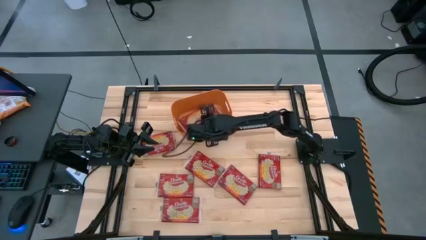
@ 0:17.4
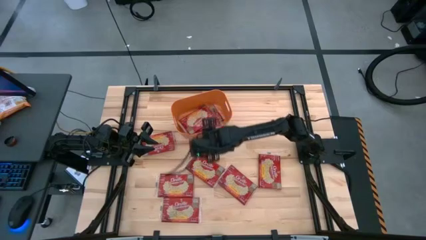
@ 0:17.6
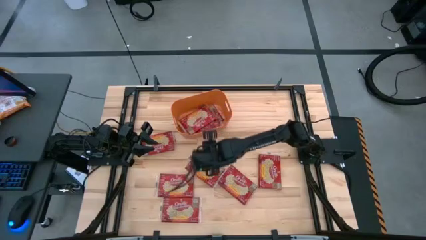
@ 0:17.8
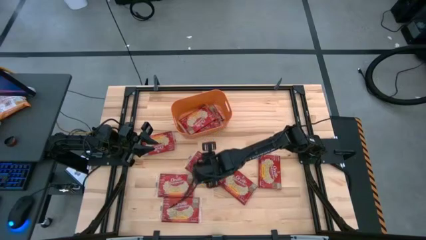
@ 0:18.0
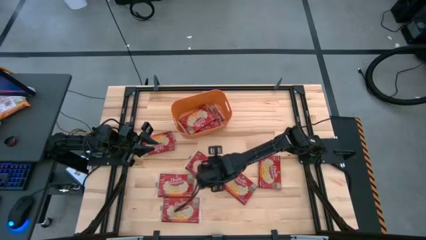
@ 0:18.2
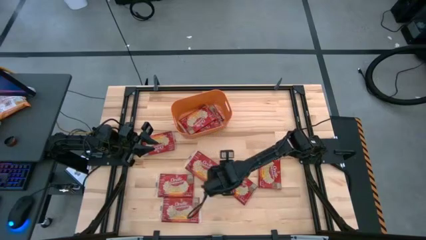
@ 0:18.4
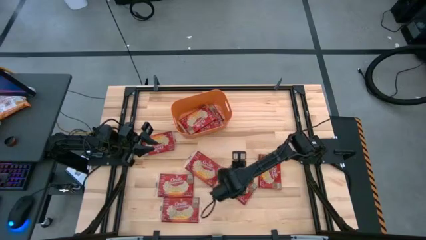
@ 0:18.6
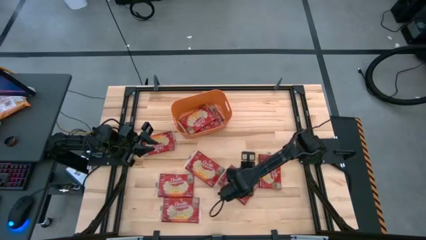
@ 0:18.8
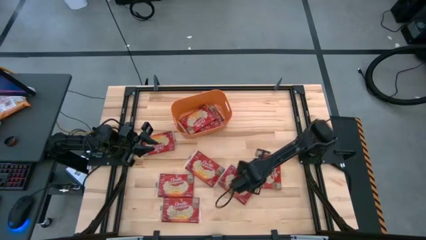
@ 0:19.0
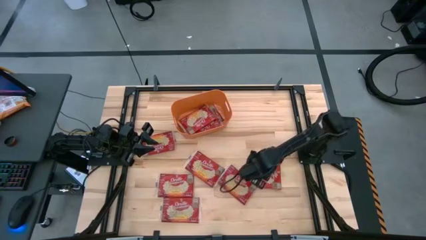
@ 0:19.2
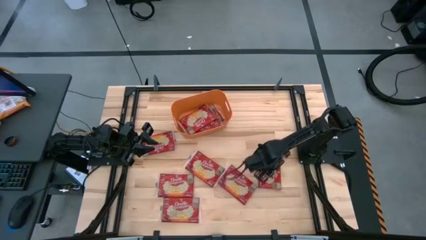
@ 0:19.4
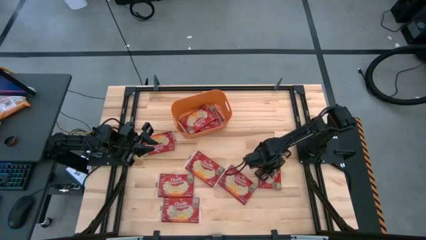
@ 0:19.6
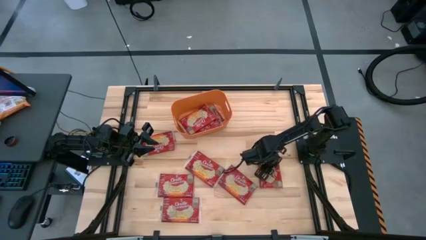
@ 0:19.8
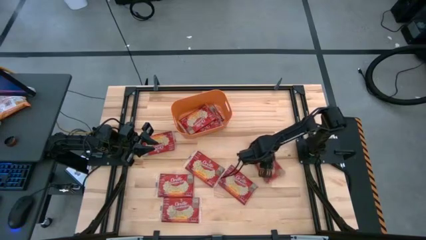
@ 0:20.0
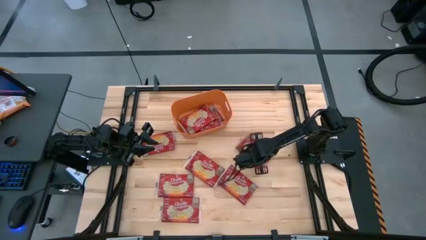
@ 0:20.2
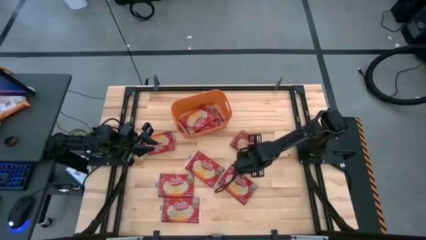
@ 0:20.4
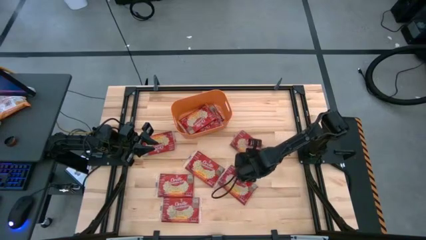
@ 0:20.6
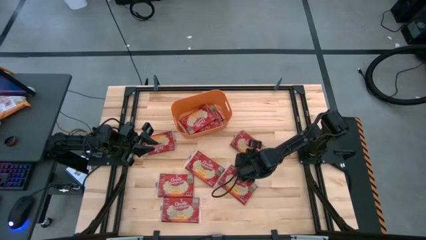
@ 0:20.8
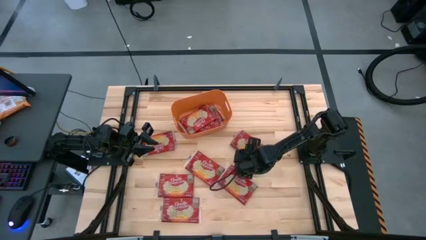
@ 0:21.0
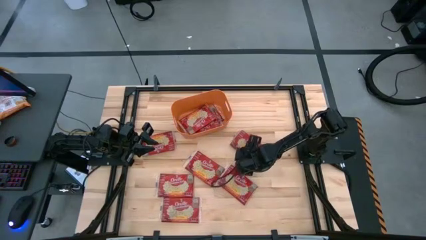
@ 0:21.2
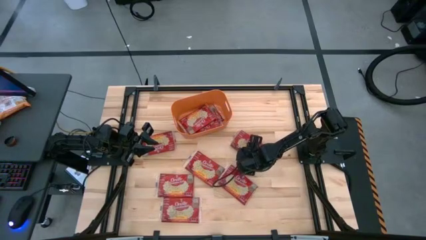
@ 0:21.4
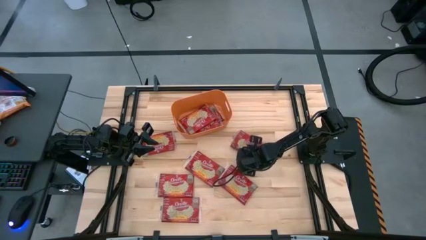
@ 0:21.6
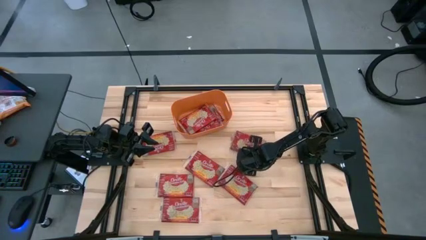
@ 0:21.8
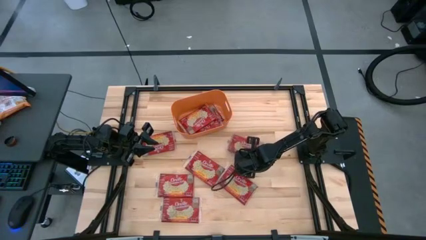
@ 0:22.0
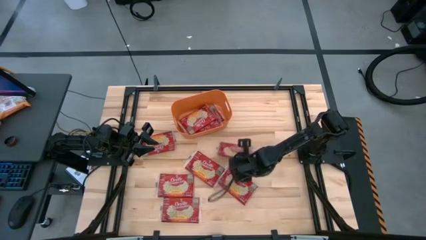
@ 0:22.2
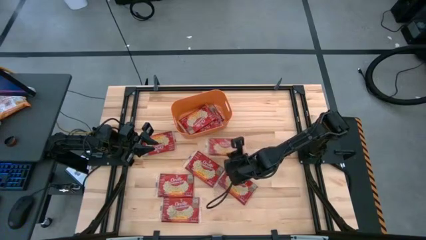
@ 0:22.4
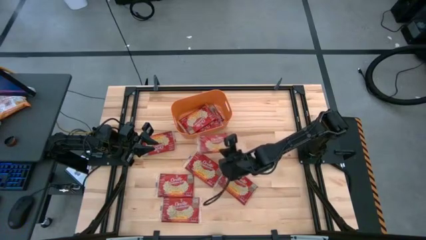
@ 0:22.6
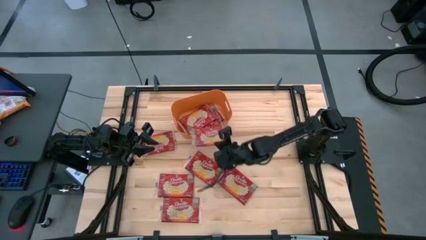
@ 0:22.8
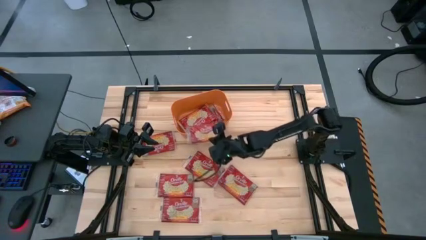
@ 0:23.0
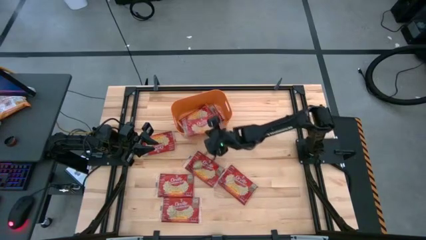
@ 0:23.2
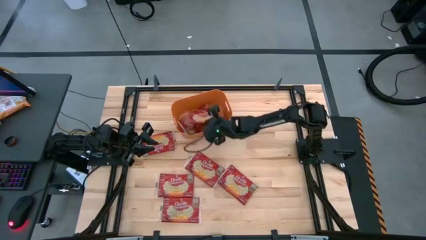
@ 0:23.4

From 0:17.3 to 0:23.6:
Task: Sort popcorn bags into baskets
Put the popcorn bag into the orange bin

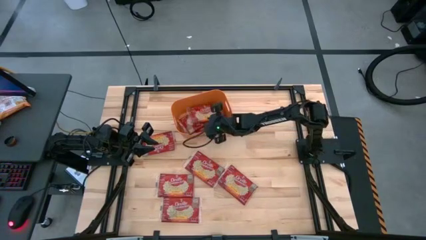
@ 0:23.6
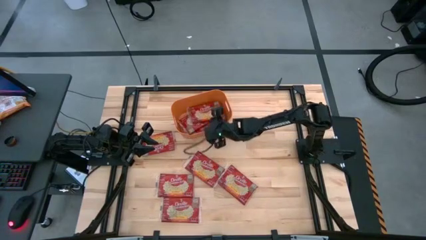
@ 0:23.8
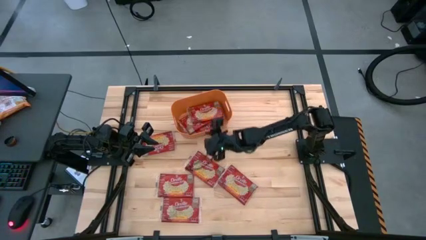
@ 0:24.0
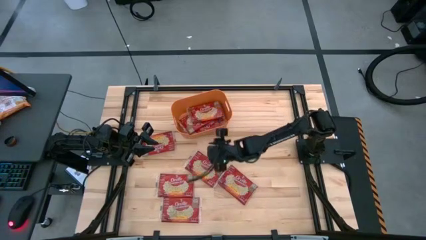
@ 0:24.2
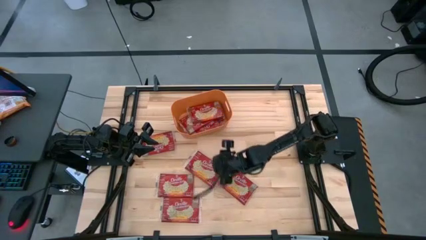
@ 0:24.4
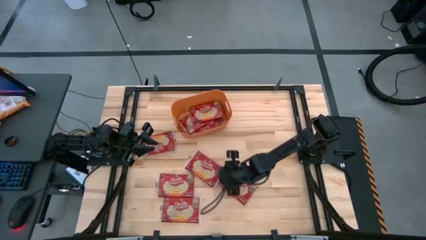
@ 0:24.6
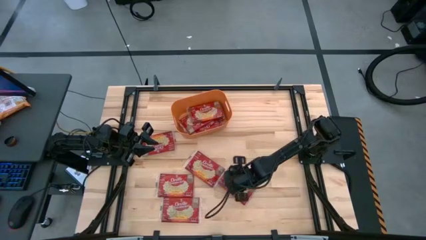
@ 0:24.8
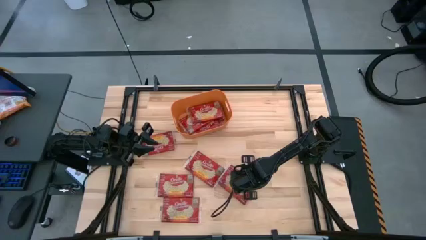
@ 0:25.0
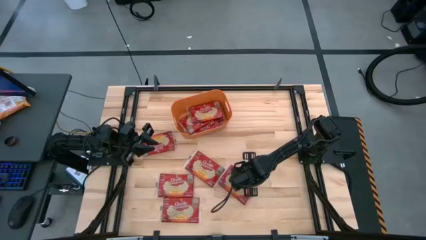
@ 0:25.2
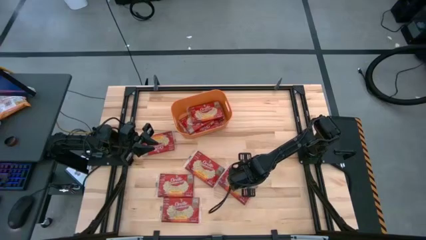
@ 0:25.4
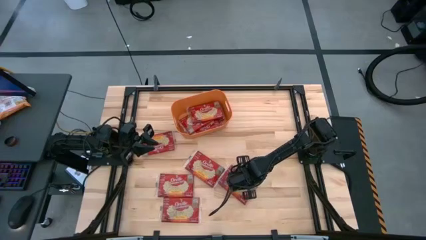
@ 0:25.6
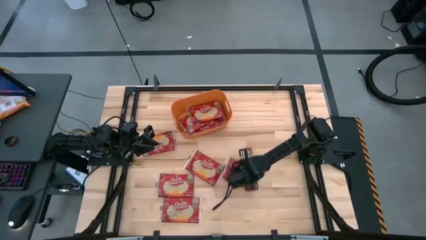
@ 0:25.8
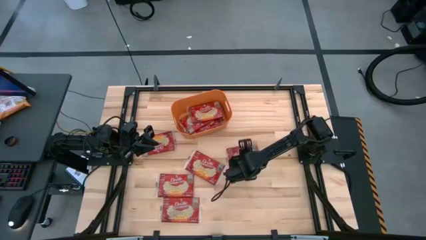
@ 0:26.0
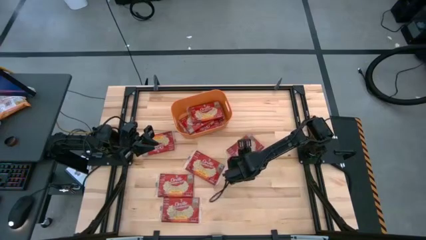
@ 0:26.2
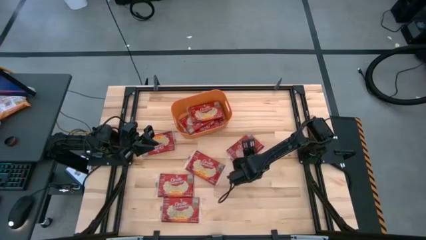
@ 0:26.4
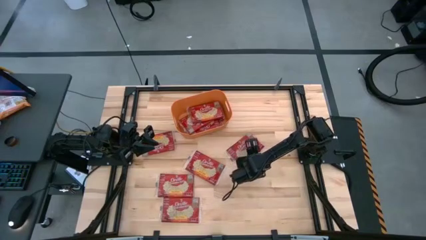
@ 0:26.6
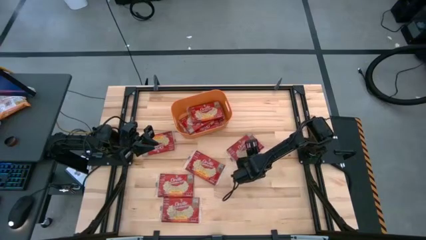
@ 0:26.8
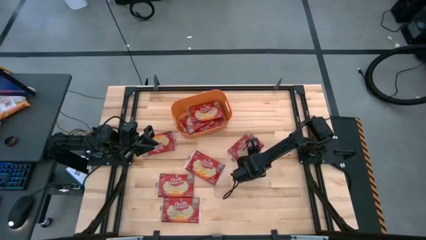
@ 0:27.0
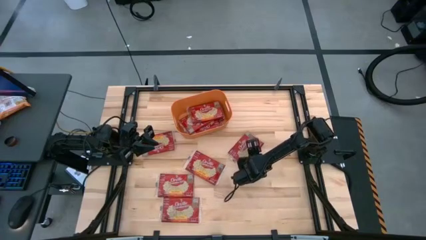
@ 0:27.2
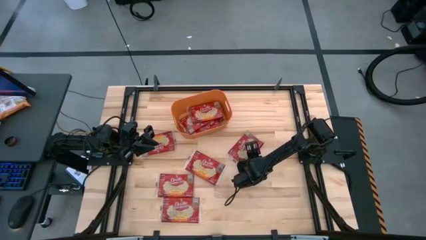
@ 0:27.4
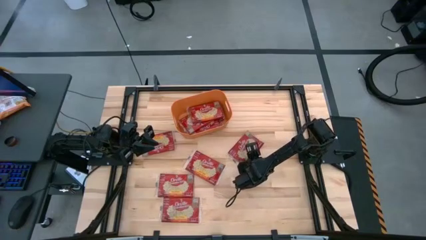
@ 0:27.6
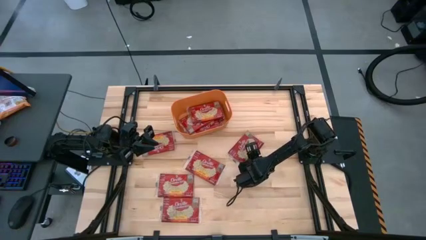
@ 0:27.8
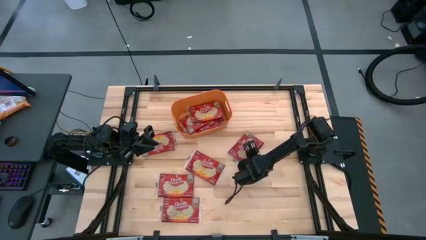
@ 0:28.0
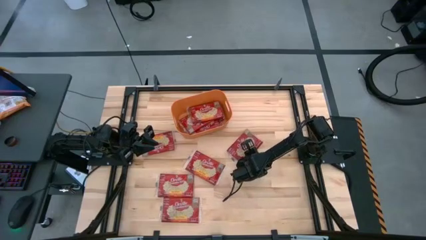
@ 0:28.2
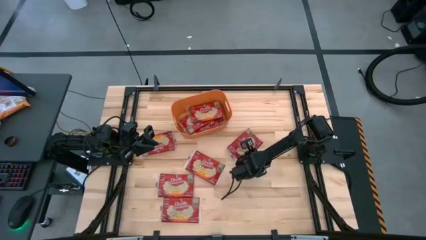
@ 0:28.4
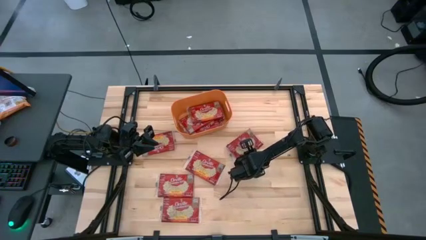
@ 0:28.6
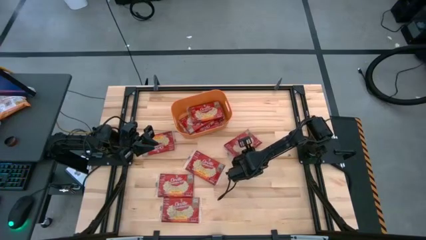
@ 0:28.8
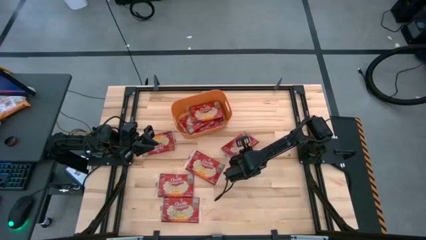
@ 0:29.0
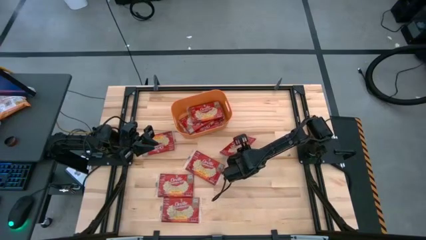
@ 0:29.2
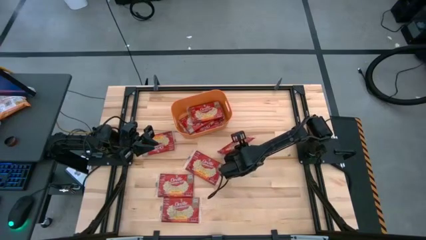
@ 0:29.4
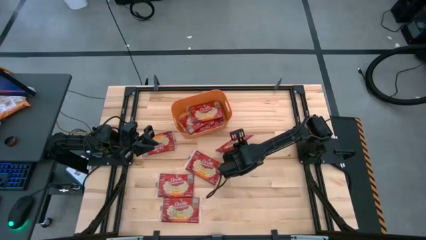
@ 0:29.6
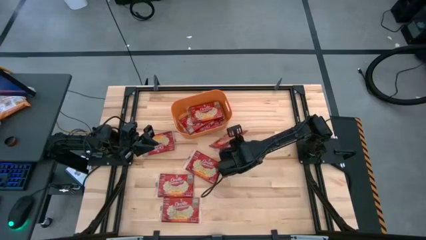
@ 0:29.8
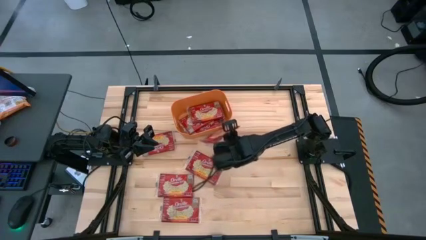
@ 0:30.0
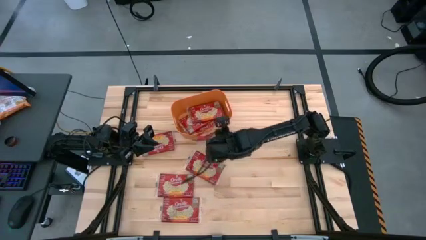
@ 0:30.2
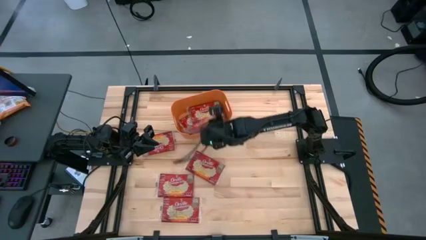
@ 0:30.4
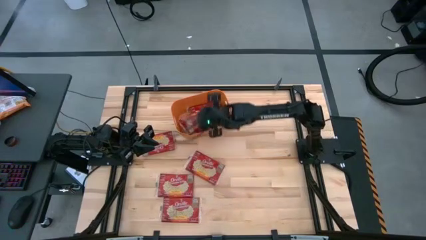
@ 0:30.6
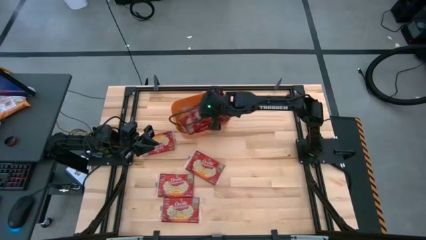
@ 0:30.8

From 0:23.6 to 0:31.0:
Put the popcorn bag into the orange bin

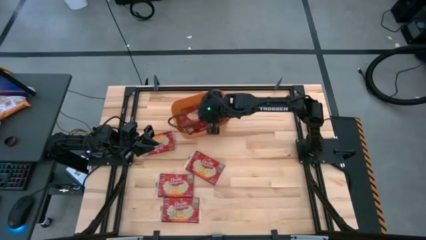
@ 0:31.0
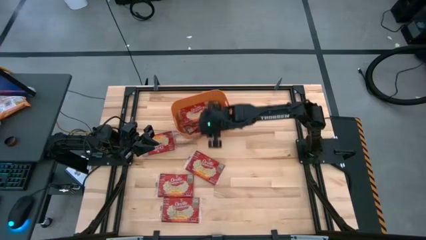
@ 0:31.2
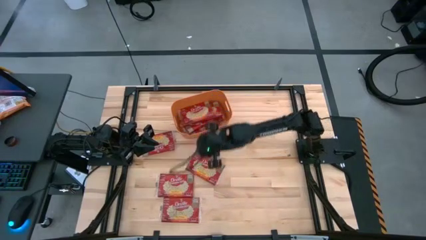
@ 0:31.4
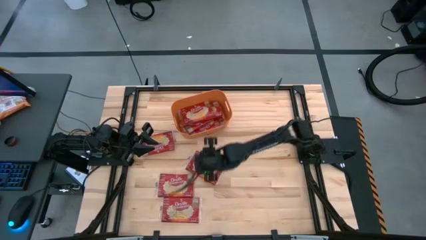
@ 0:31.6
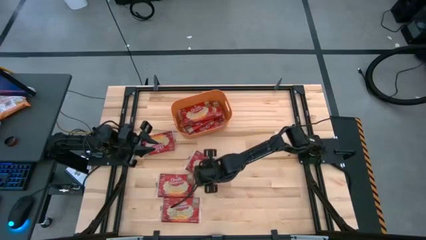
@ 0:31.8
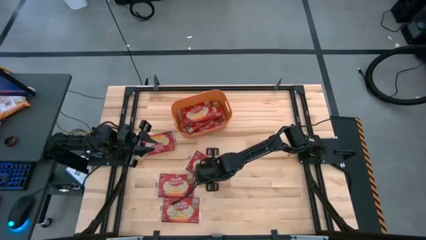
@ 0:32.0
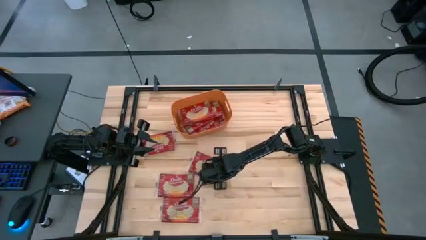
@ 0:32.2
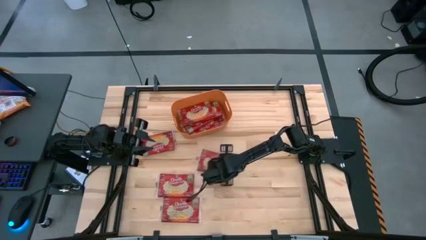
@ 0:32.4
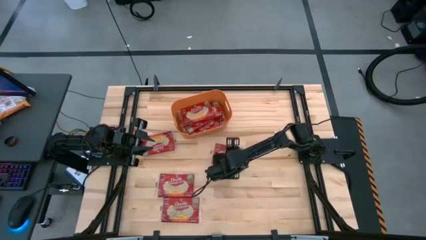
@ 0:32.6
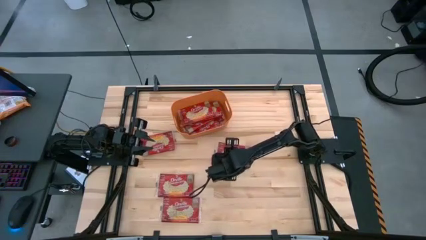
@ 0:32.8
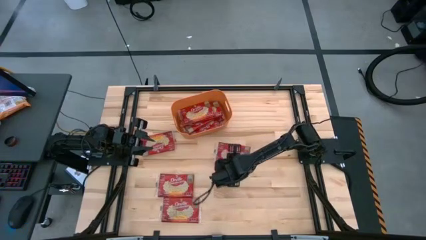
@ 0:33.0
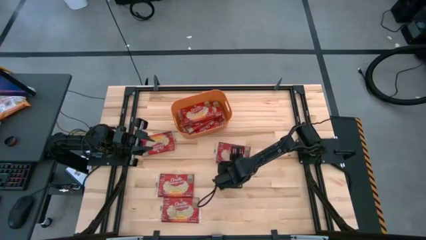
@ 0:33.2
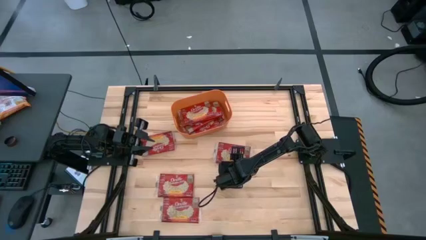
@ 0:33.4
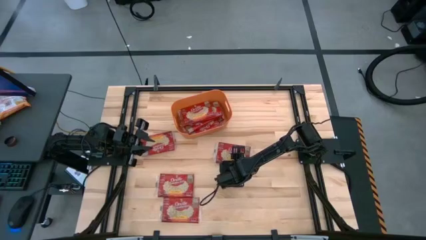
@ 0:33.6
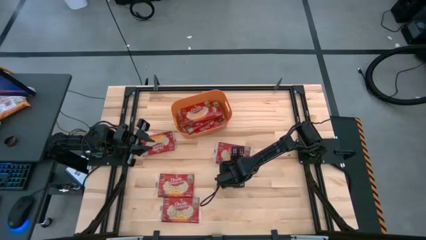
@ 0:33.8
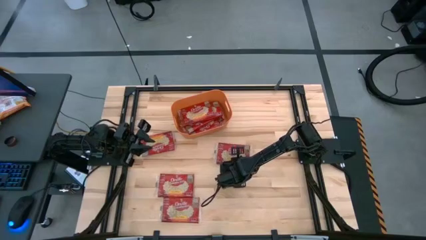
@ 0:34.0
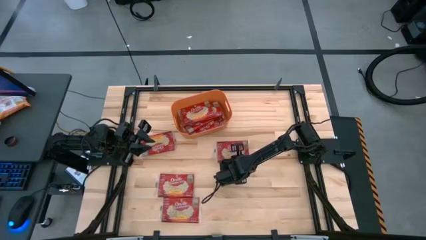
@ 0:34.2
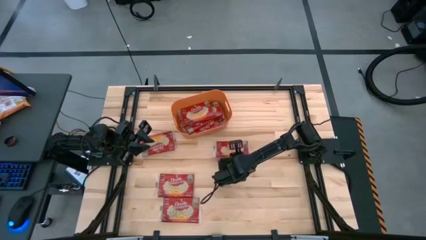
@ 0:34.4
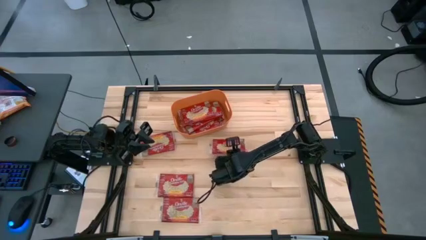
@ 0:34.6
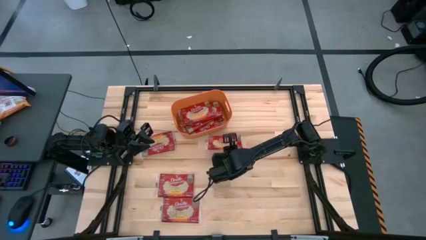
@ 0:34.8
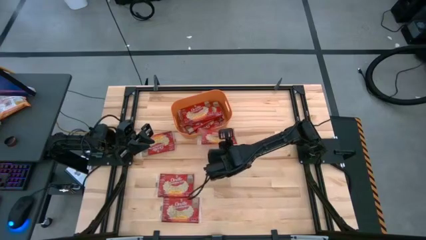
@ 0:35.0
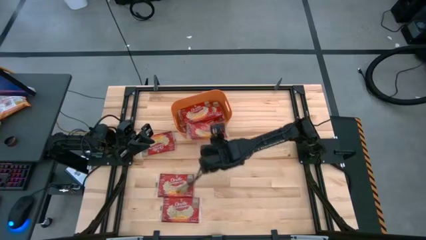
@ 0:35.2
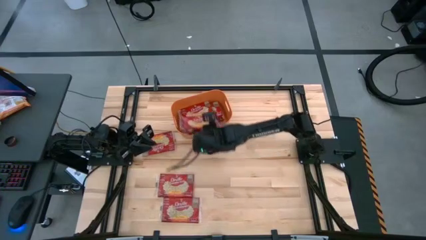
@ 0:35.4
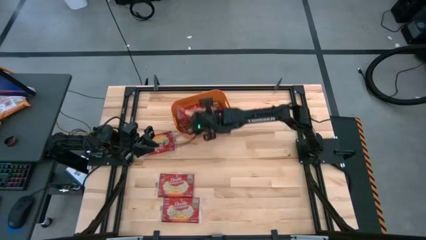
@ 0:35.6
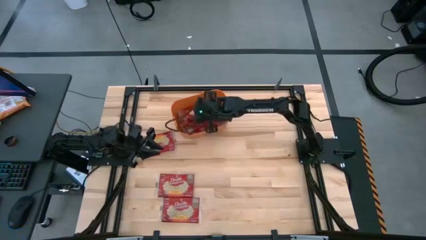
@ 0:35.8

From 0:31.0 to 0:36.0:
Put the popcorn bag into the orange bin
